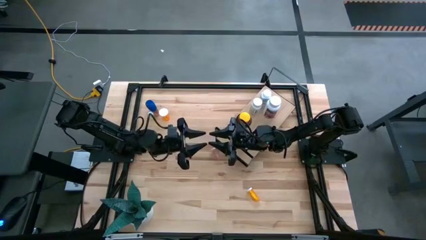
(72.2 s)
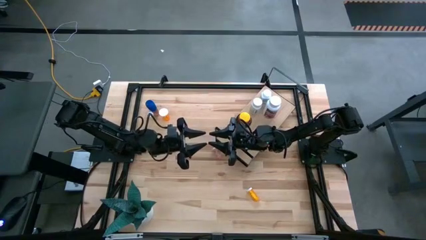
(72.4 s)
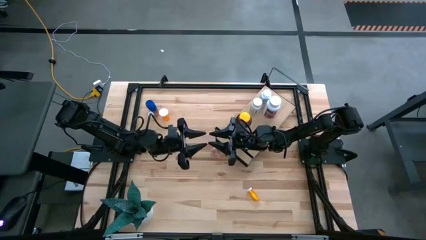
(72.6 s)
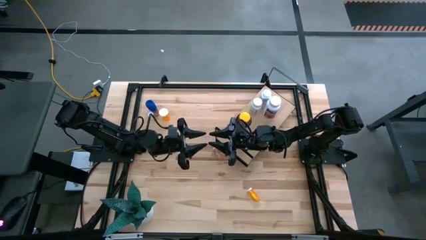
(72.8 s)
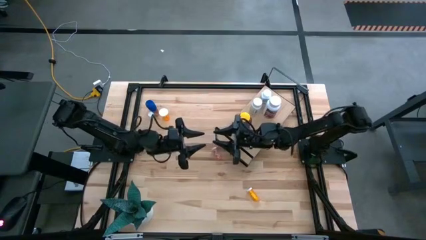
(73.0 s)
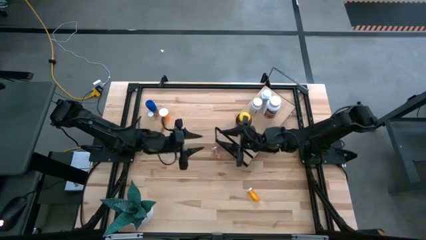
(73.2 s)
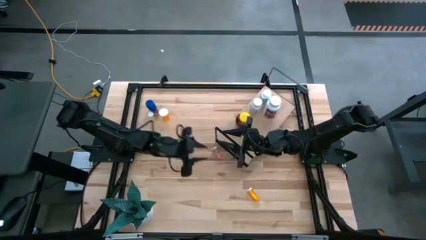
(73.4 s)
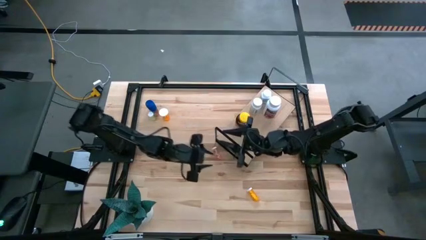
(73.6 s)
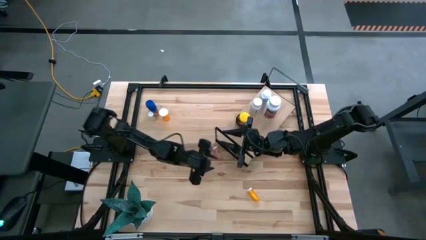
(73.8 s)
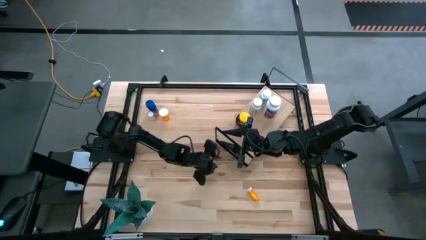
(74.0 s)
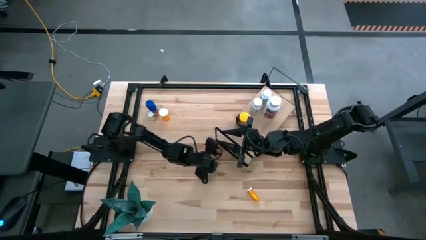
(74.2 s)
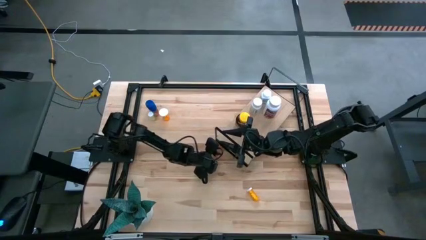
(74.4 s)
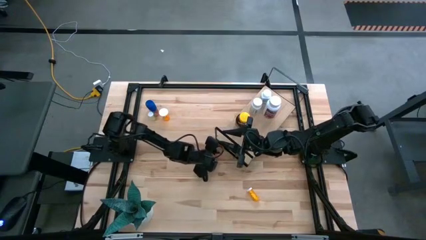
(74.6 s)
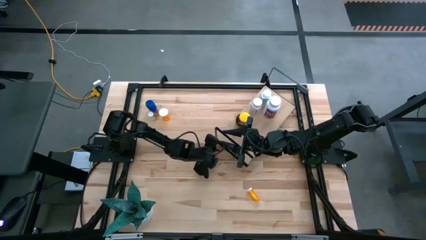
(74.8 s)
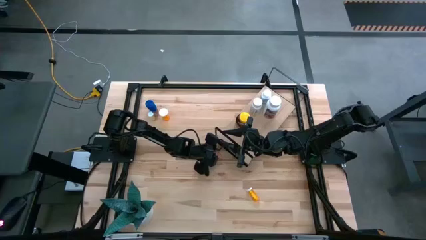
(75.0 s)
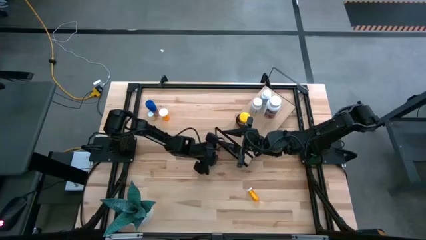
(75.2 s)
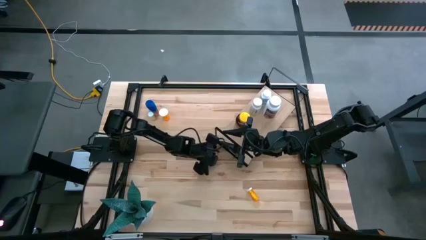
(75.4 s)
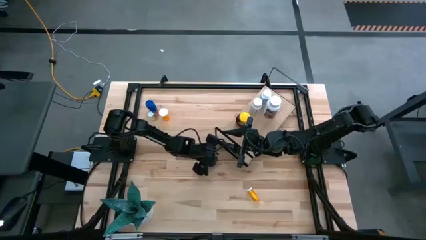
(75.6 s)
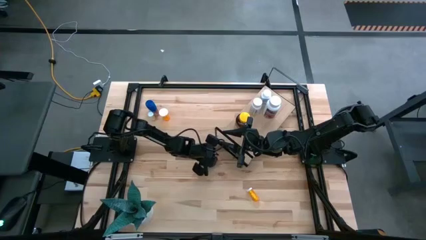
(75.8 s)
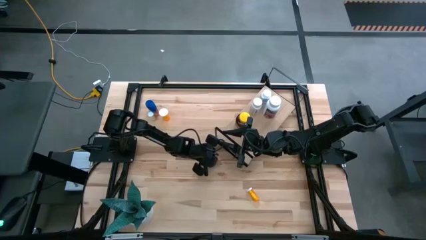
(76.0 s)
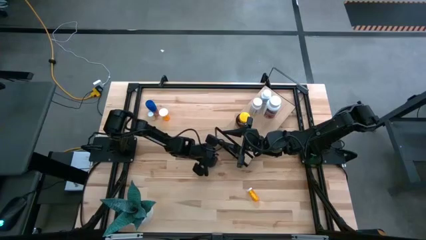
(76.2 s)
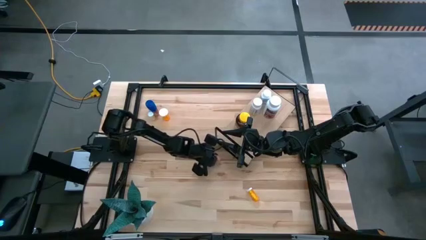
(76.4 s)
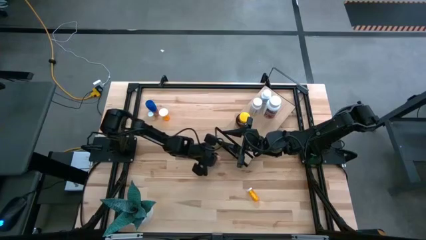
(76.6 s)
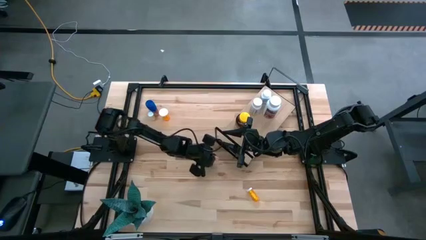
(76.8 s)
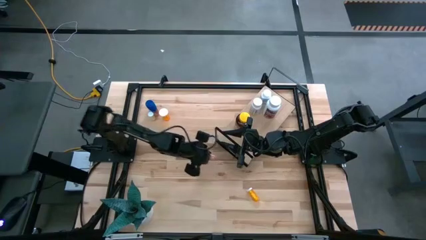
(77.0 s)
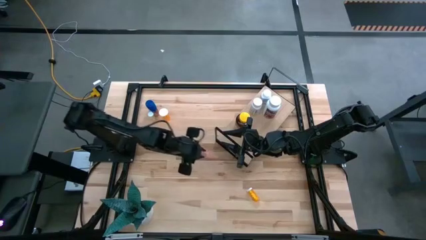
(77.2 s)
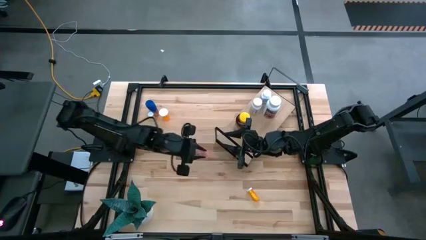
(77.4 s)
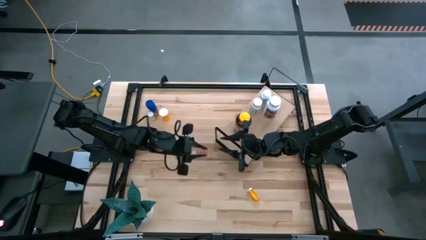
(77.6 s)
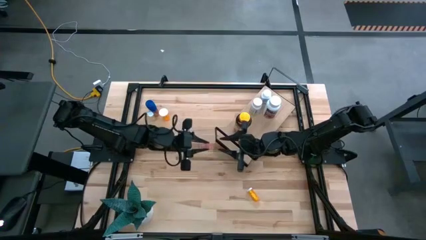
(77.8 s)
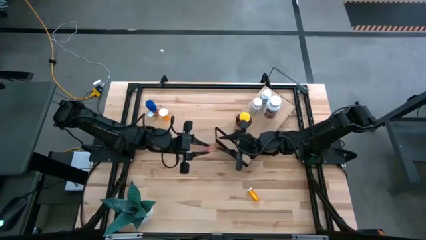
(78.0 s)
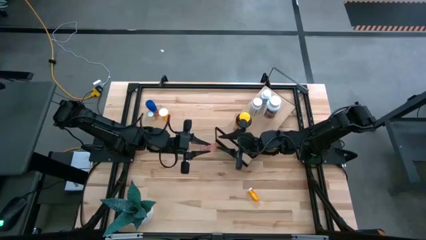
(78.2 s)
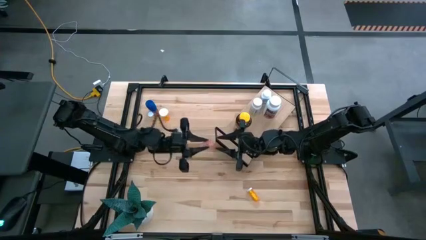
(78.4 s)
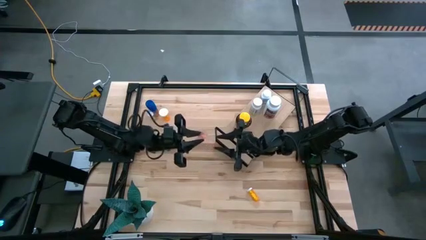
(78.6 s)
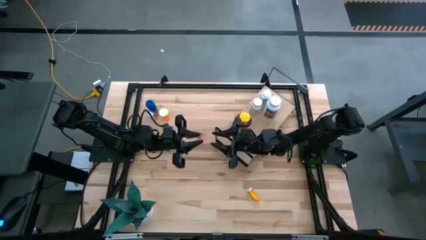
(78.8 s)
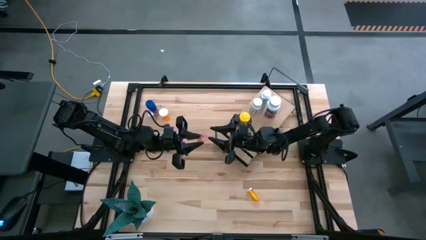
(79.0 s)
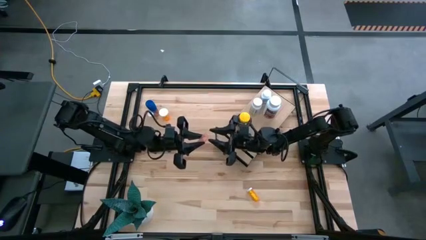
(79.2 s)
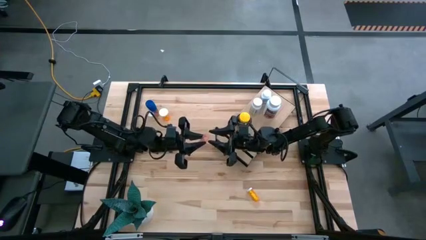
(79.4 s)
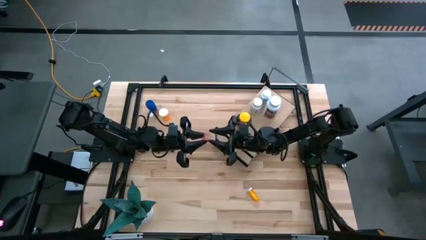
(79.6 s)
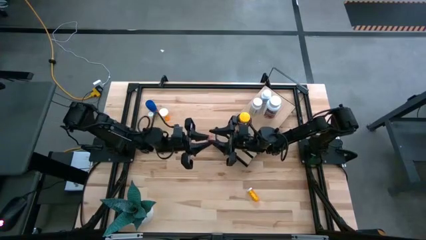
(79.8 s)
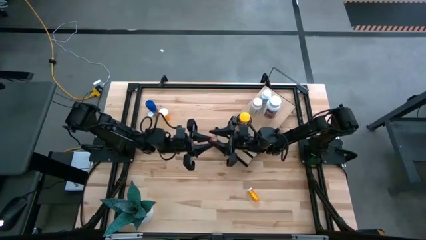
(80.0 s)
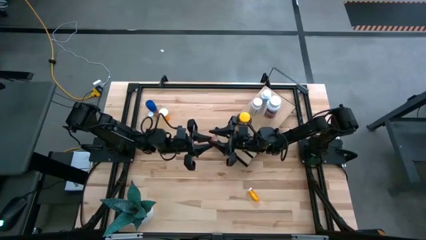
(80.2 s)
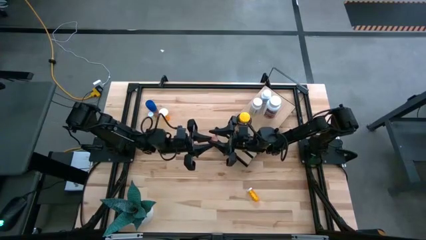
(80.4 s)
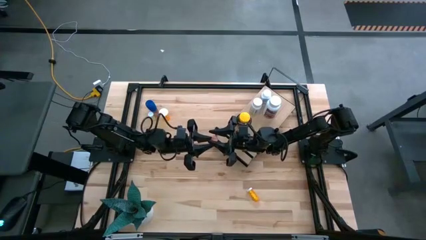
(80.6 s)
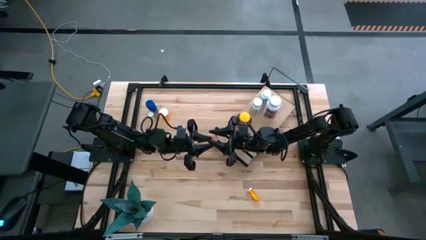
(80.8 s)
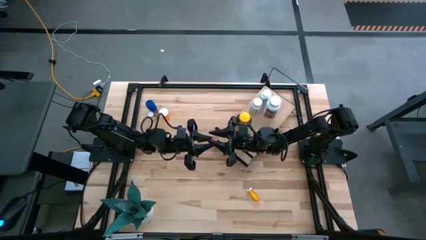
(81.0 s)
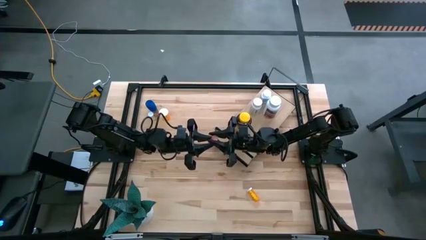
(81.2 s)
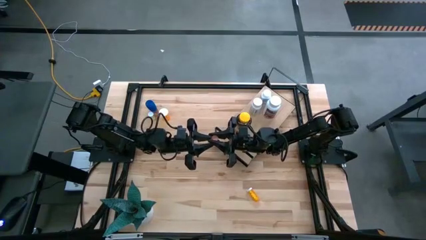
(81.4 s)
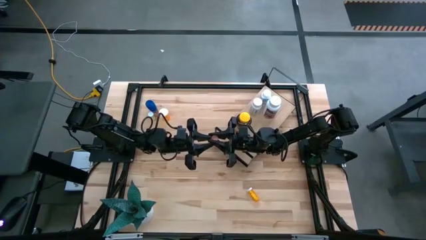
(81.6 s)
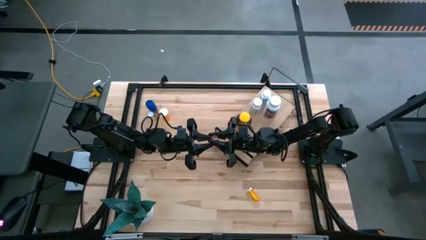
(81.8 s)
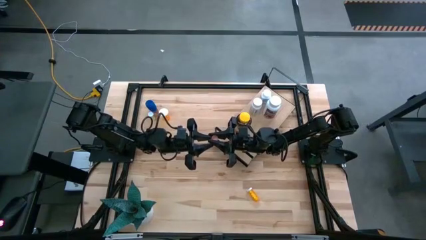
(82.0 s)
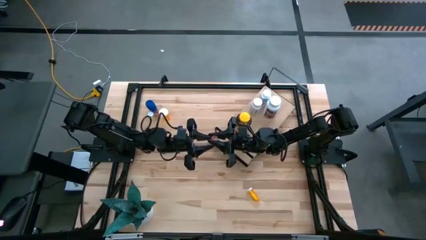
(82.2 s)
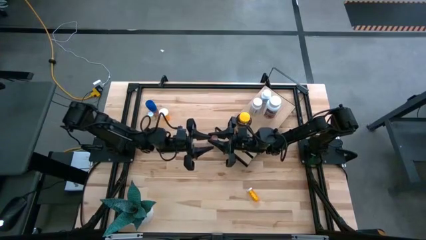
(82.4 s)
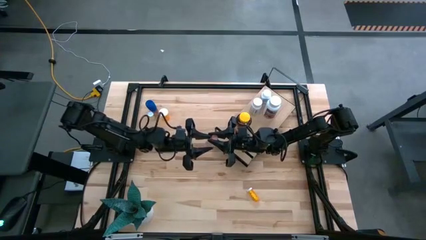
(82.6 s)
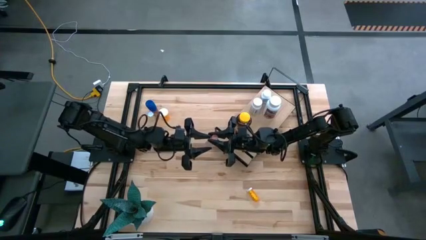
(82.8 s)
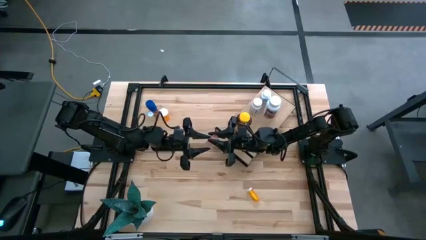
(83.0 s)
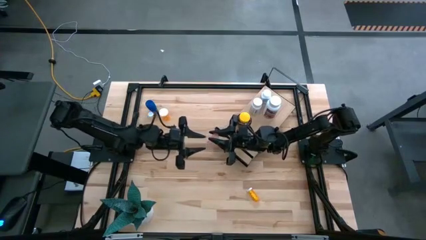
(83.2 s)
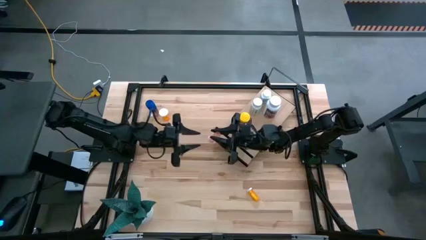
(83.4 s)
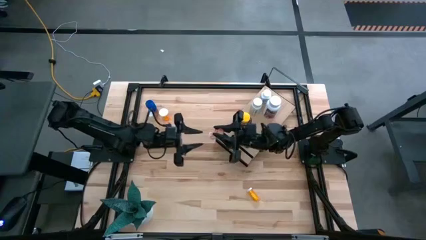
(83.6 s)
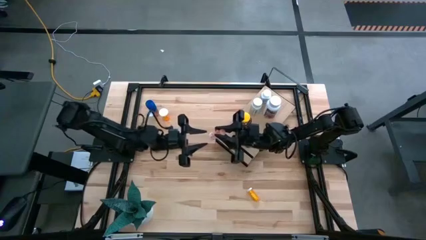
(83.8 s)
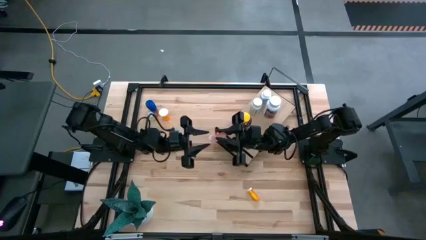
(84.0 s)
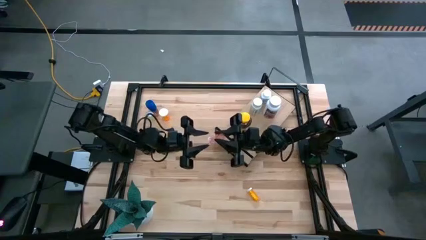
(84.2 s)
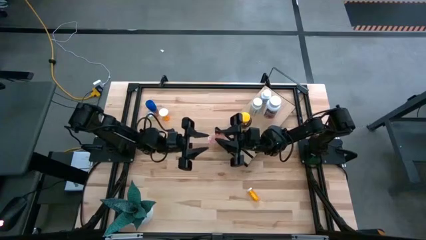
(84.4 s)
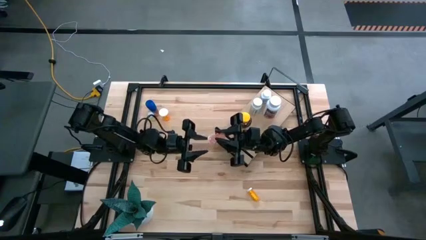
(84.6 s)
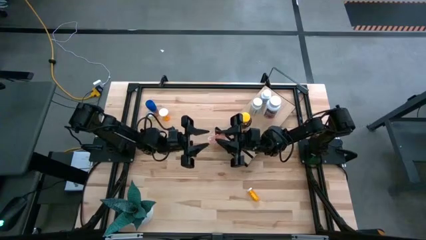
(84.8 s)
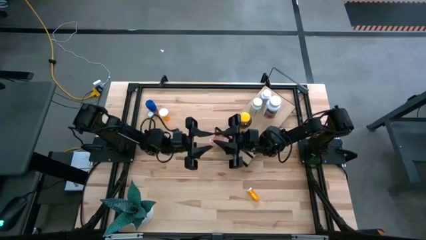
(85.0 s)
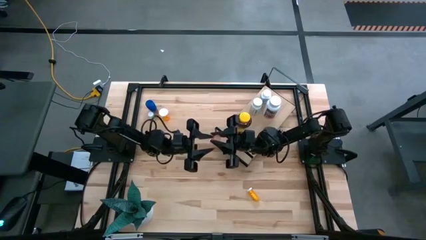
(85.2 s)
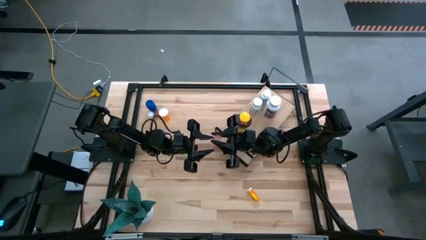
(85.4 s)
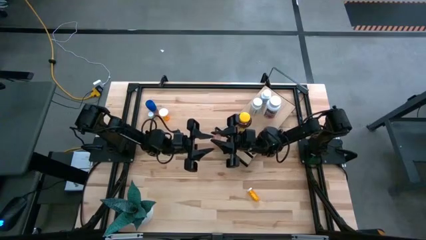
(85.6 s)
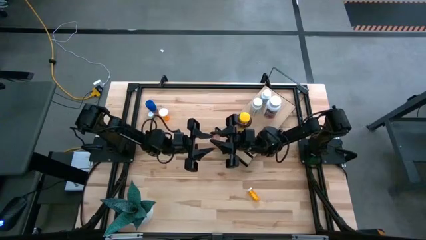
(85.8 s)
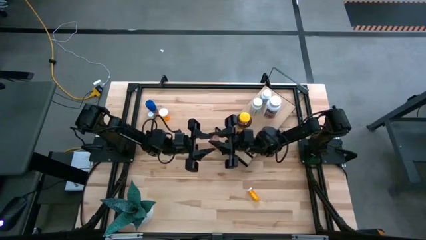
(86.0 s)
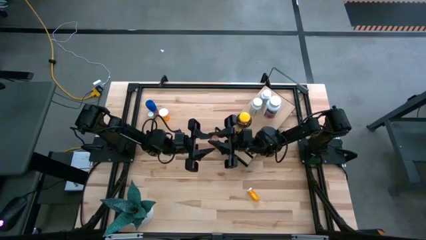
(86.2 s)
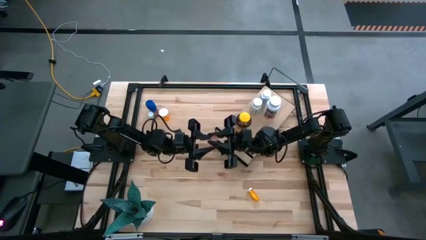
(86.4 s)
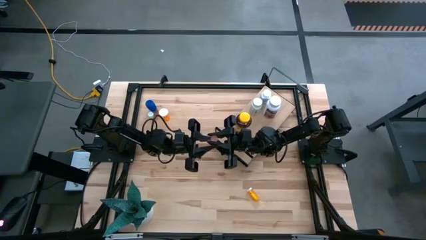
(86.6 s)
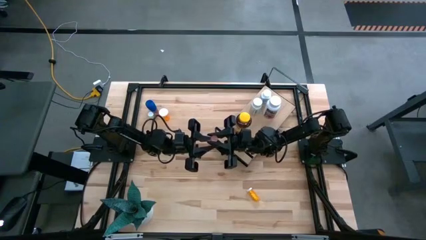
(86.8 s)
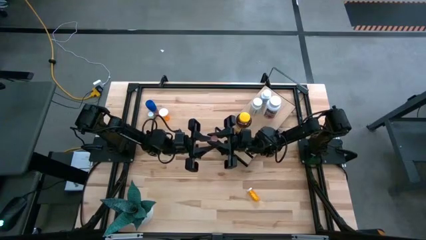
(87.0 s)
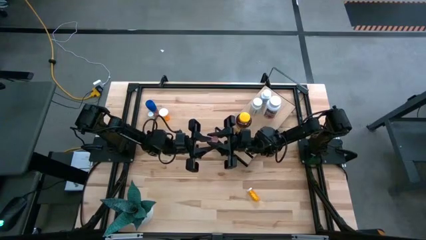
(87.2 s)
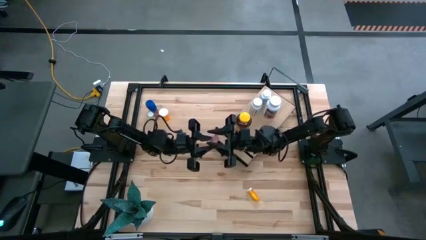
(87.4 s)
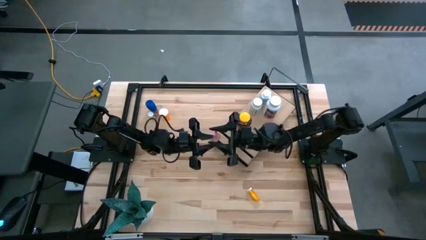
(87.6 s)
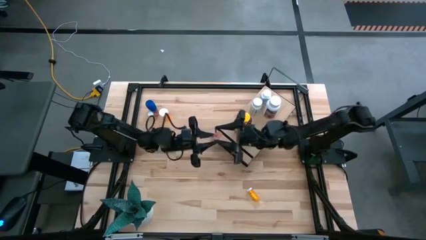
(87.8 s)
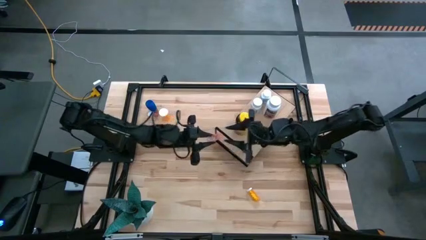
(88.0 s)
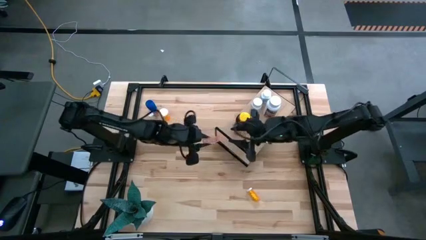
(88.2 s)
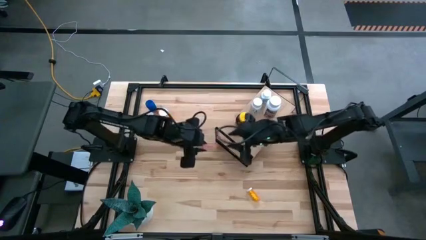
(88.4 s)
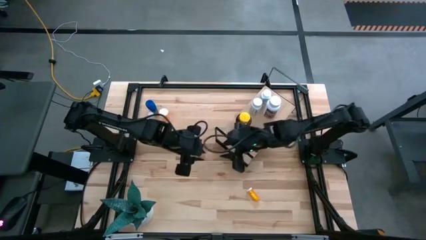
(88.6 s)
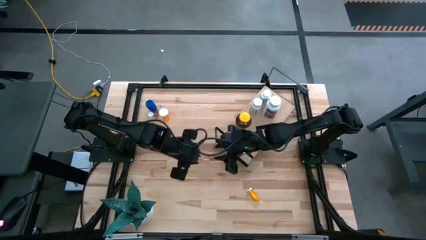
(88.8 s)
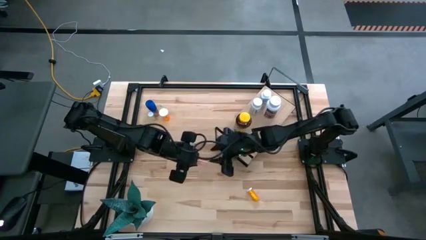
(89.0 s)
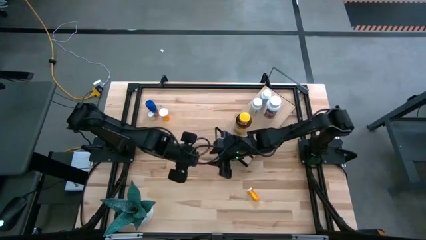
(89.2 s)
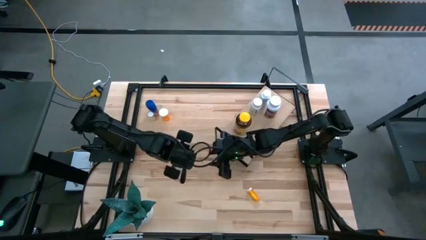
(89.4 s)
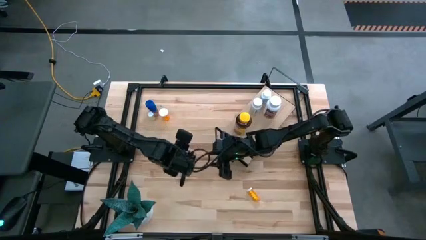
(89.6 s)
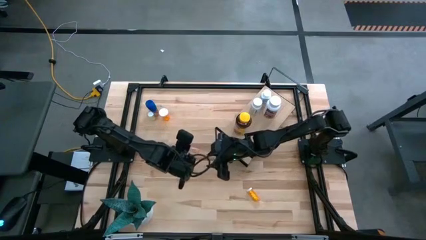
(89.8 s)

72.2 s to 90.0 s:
Task: Pick and place medicine bottles onto shelf by color
Put the red pill bottle on the shelf
